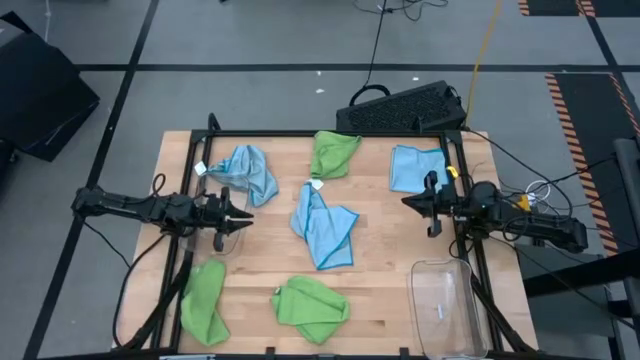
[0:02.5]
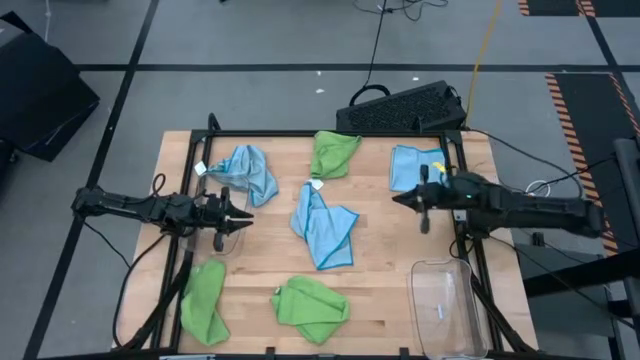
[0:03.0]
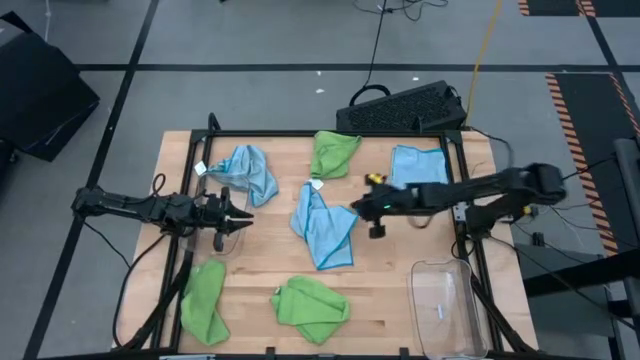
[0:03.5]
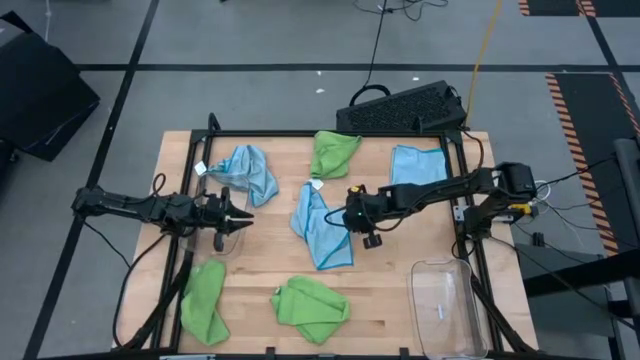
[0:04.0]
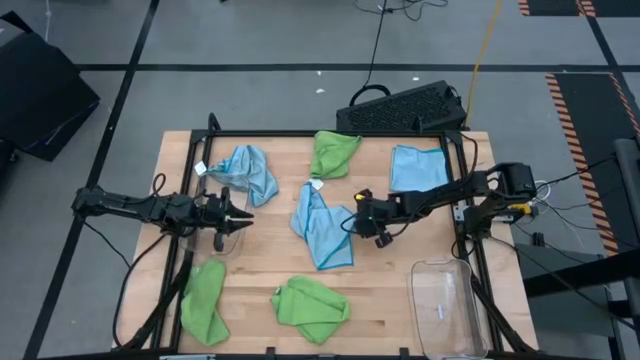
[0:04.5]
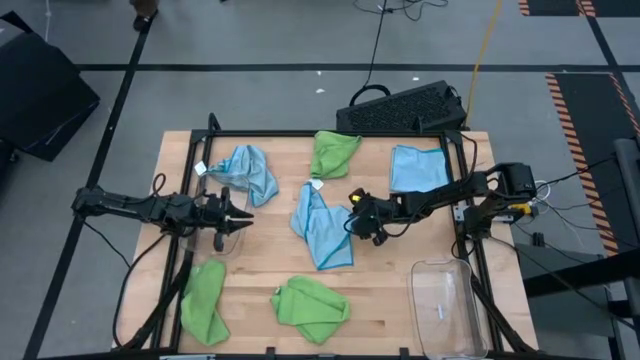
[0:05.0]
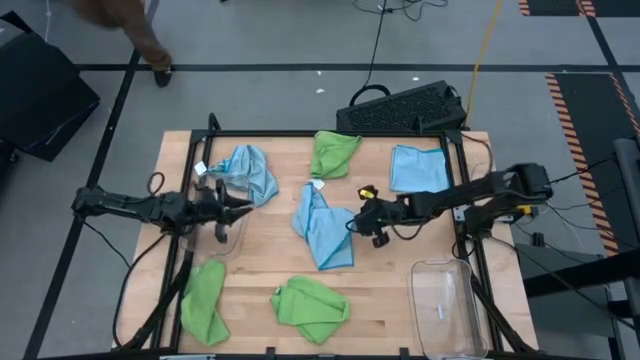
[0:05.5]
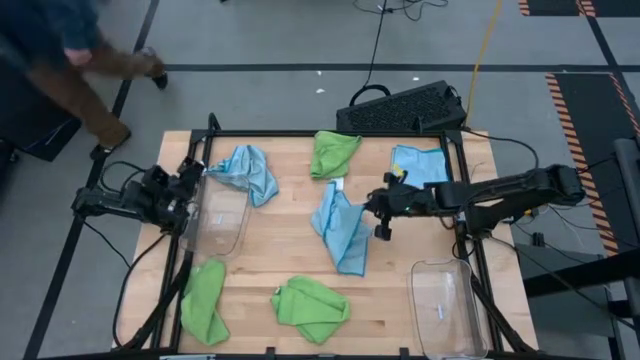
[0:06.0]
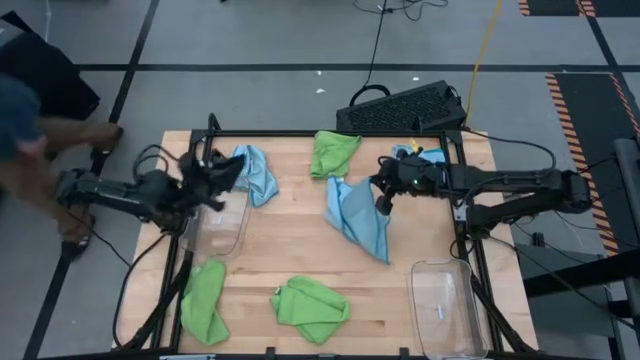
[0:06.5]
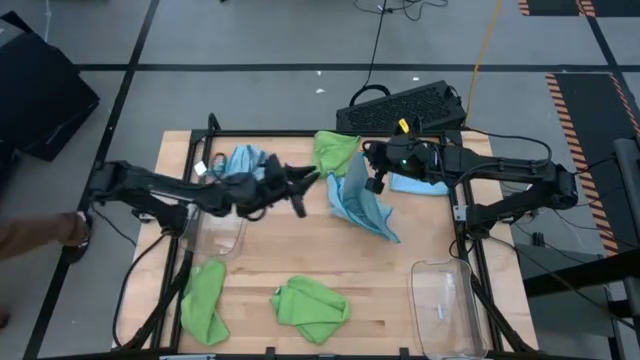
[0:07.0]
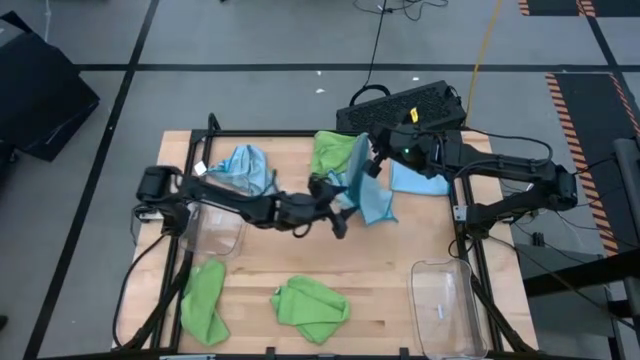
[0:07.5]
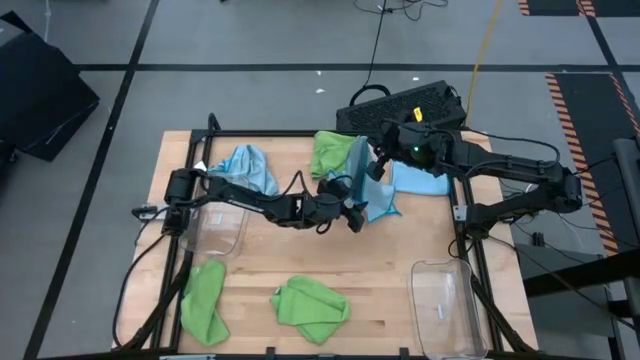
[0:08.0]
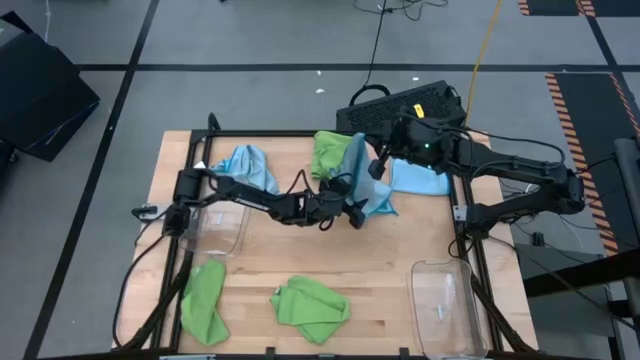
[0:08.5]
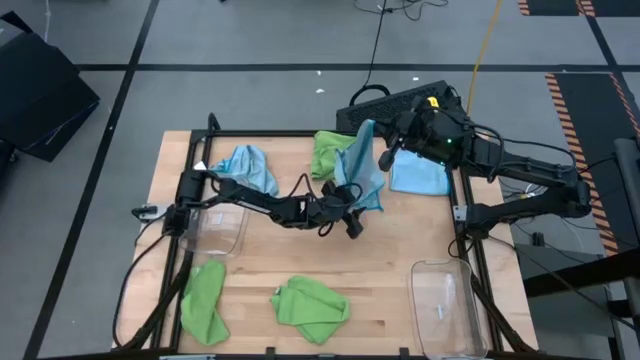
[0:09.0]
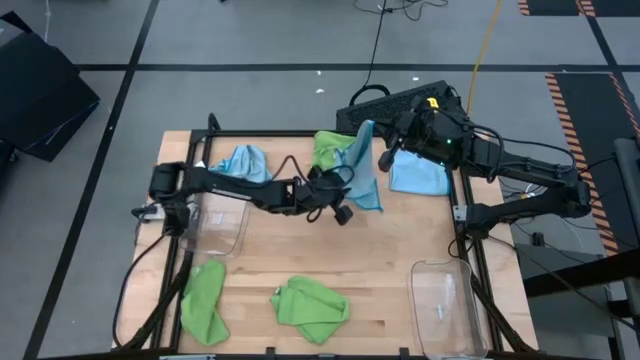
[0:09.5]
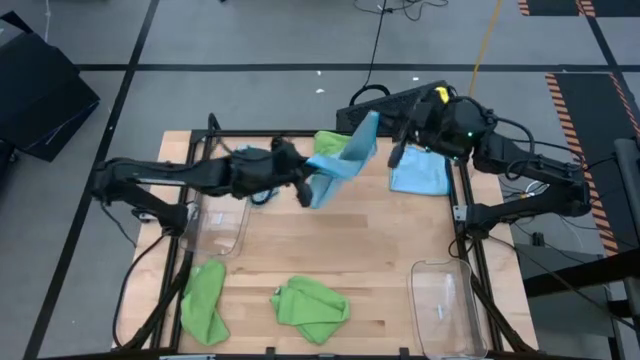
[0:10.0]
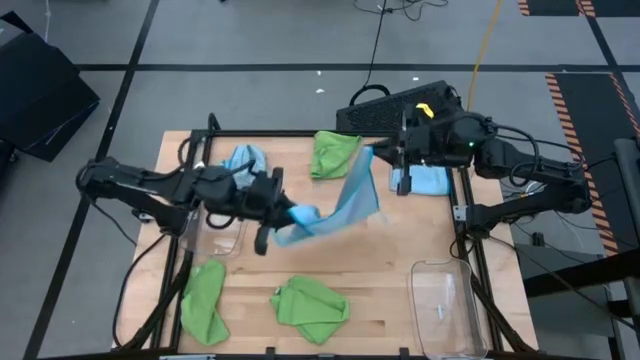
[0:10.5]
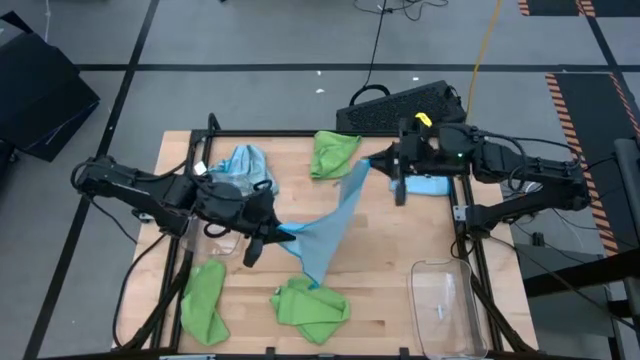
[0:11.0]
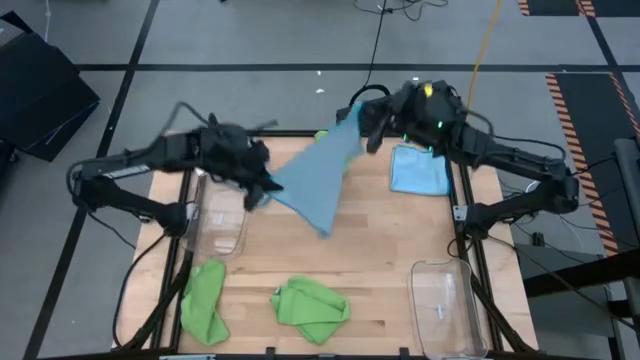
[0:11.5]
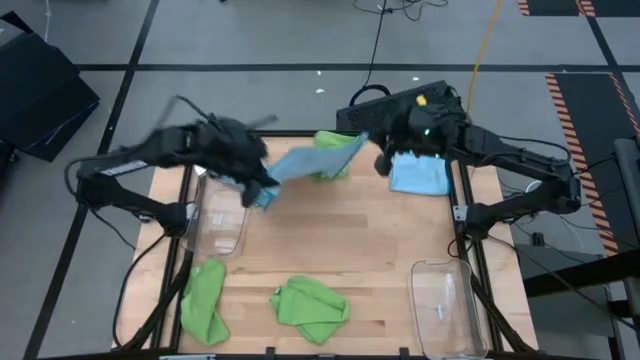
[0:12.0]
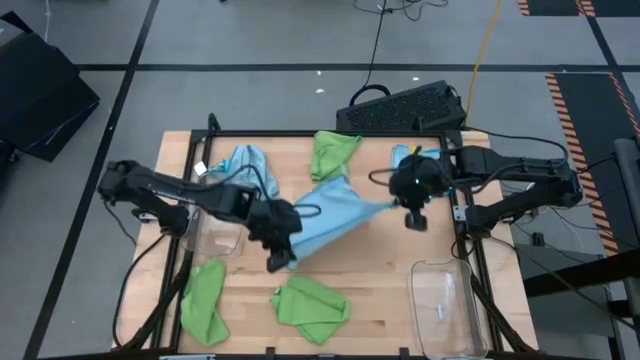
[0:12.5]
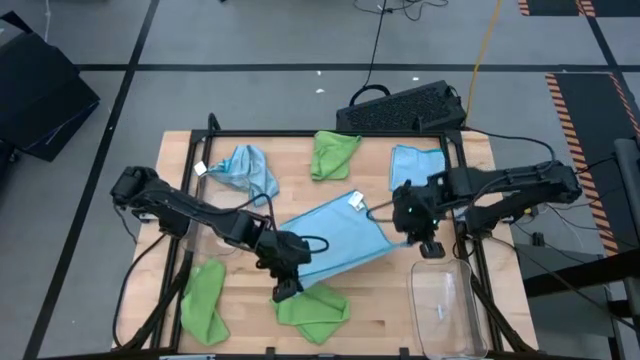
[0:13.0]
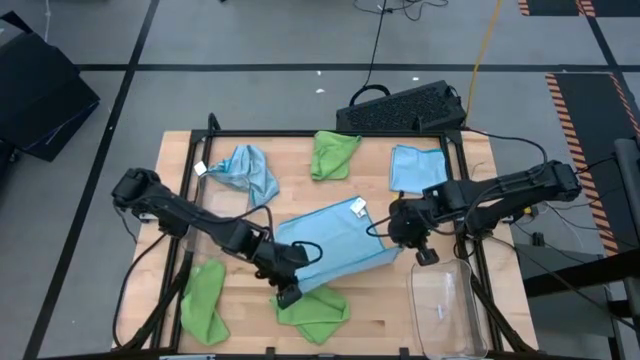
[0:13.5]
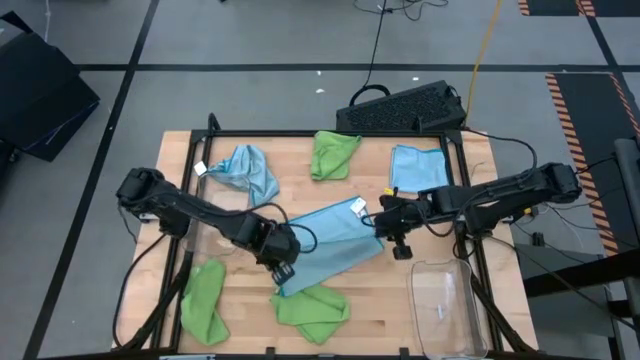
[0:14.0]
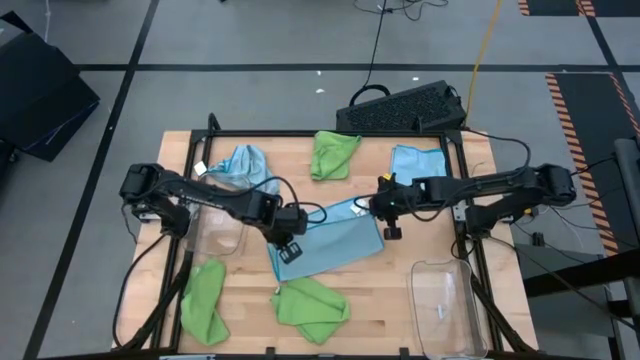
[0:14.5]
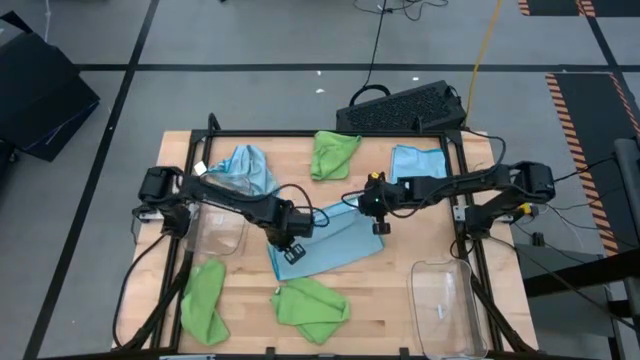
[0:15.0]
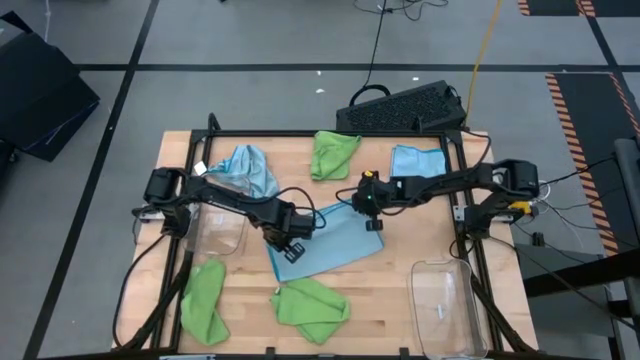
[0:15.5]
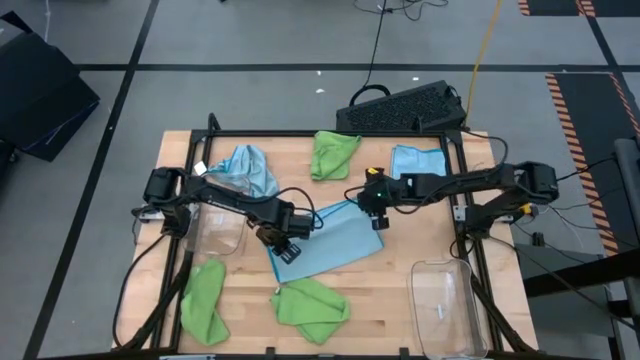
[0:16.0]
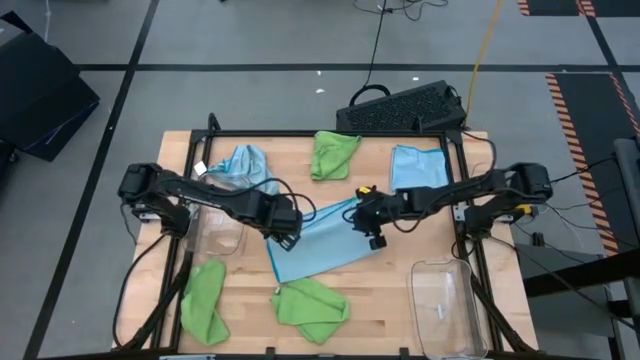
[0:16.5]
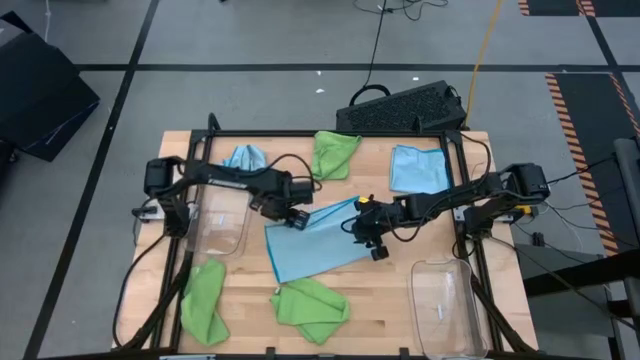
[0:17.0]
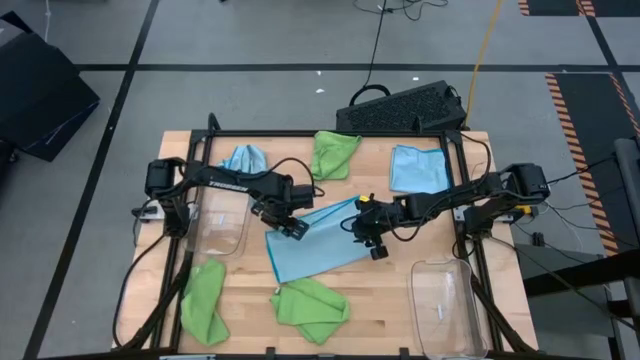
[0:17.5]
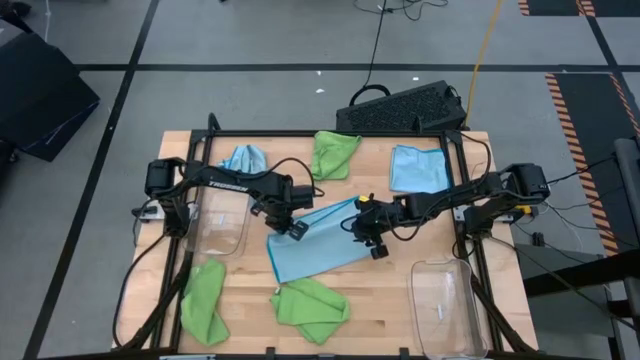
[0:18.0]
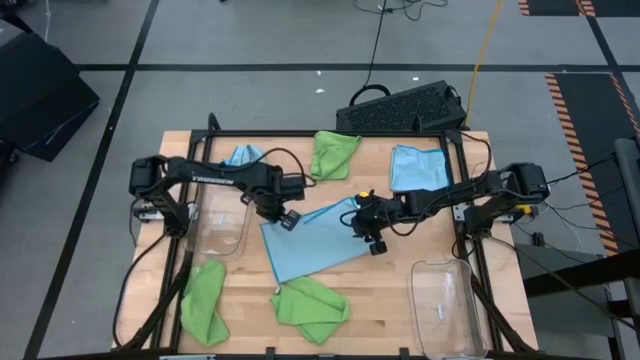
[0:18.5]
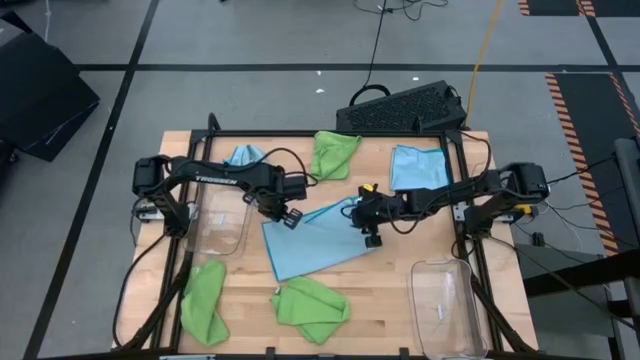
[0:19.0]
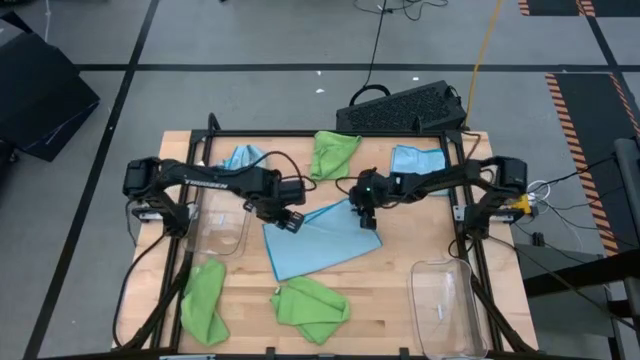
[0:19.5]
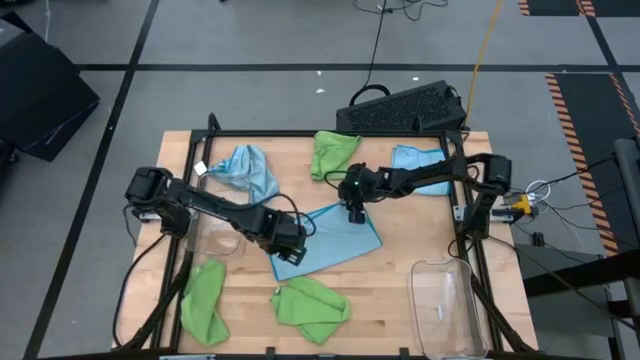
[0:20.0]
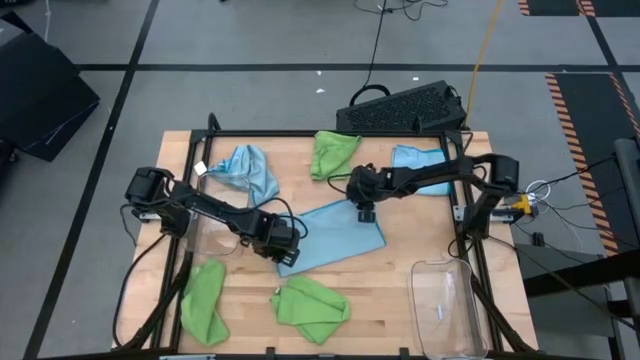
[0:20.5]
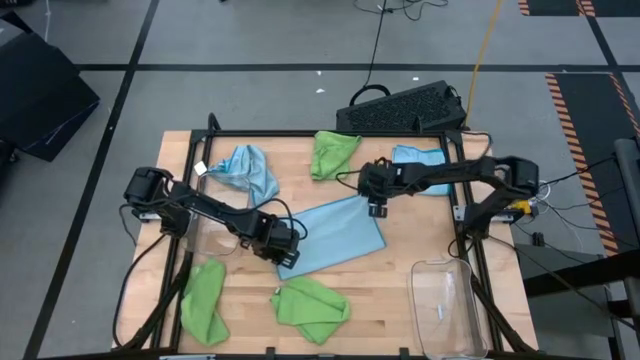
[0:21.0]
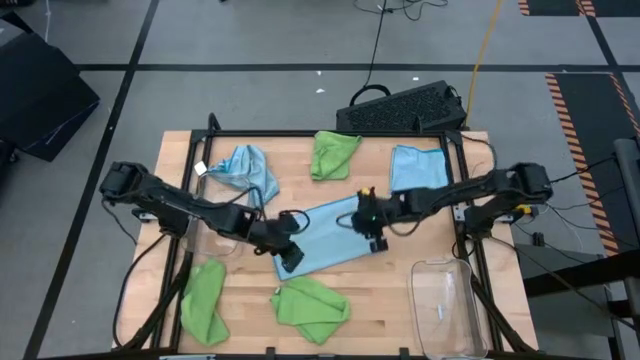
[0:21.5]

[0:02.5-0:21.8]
Task: Sort microfiber towel by color & place in baskets
Fold the bottom blue microfiber towel
